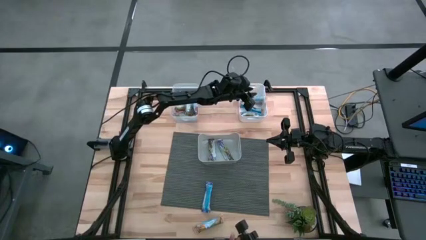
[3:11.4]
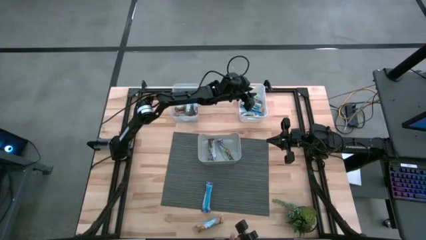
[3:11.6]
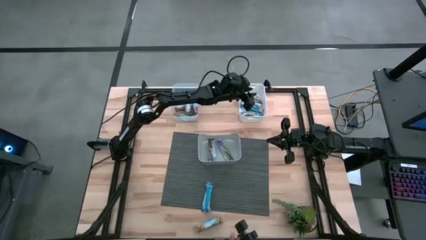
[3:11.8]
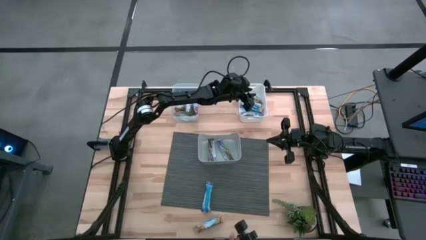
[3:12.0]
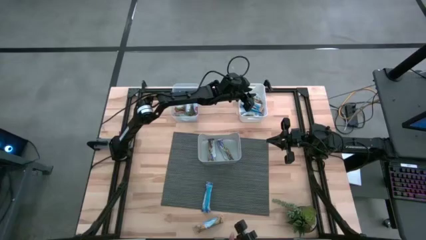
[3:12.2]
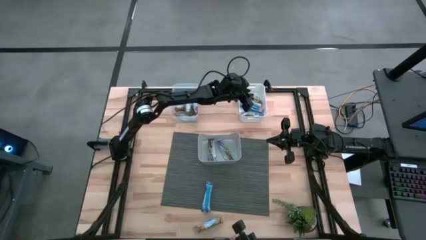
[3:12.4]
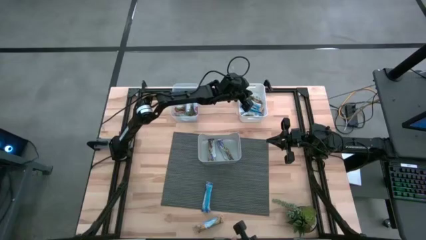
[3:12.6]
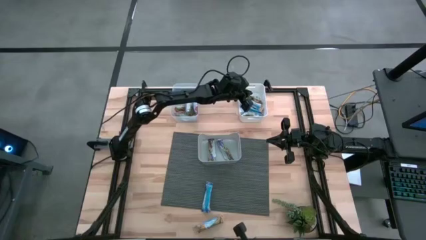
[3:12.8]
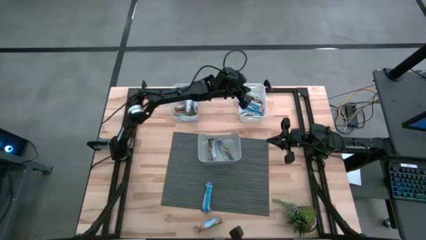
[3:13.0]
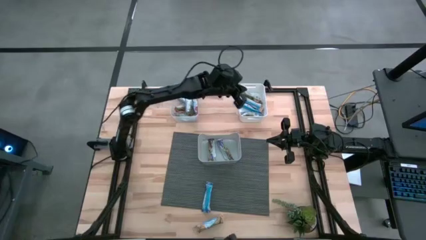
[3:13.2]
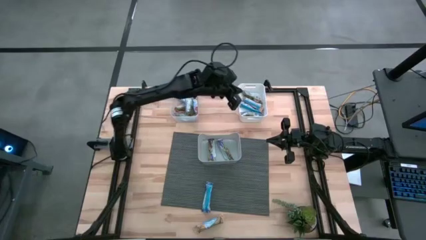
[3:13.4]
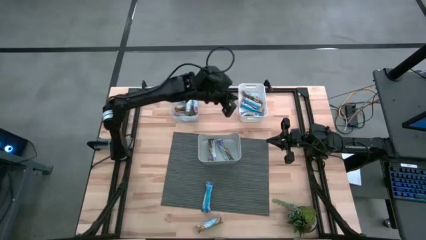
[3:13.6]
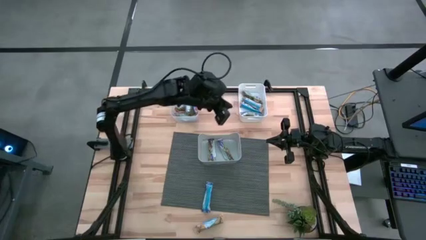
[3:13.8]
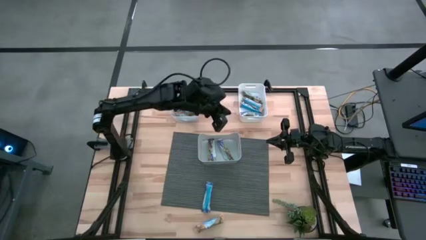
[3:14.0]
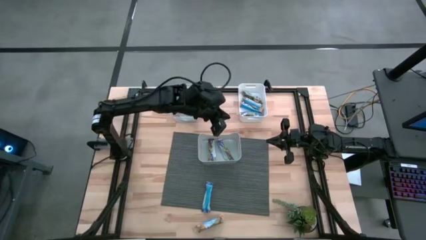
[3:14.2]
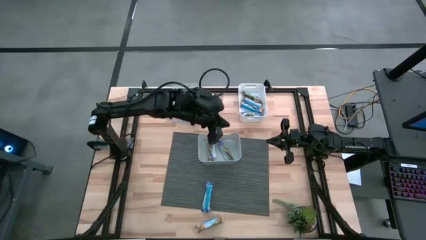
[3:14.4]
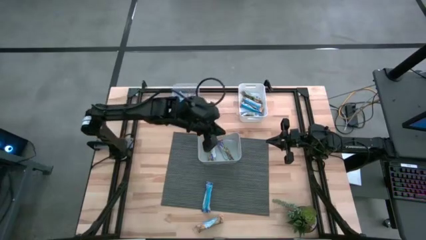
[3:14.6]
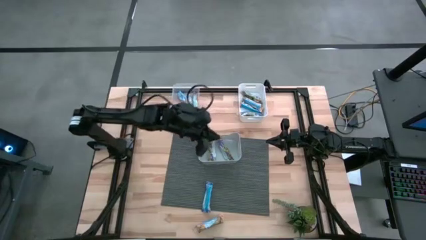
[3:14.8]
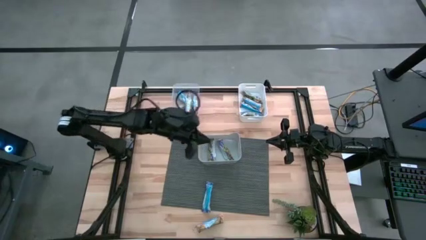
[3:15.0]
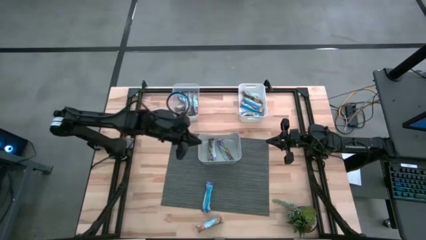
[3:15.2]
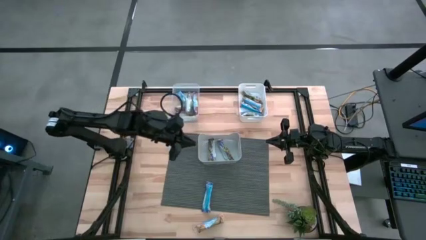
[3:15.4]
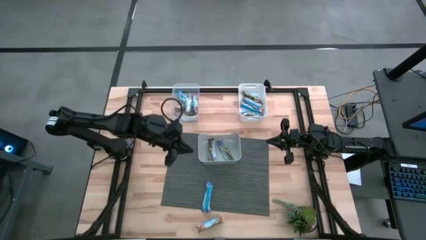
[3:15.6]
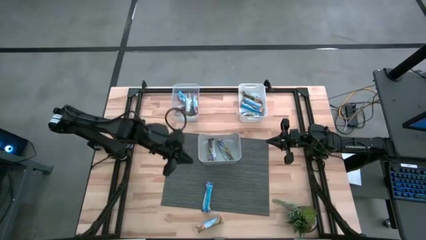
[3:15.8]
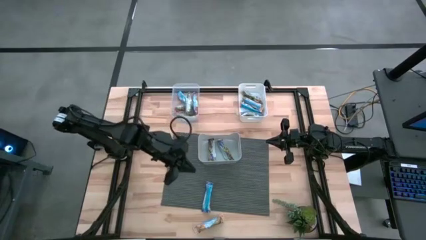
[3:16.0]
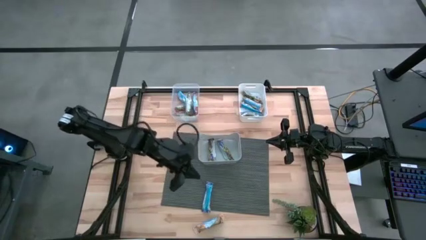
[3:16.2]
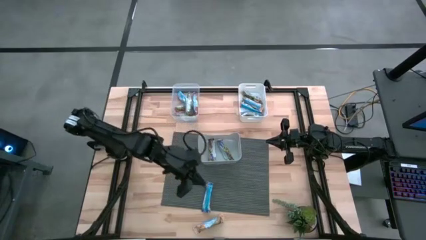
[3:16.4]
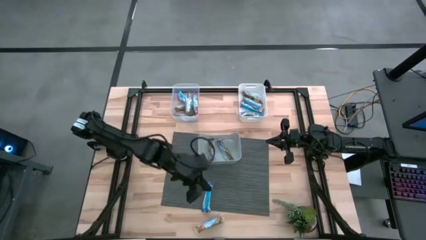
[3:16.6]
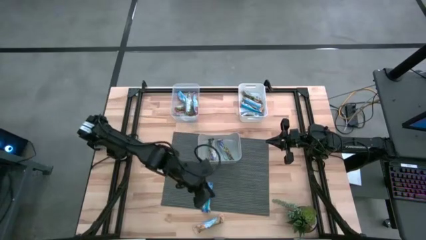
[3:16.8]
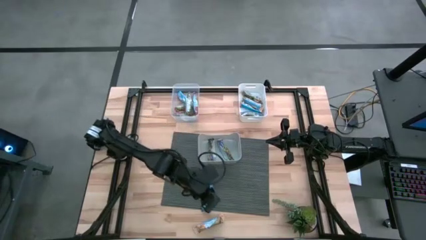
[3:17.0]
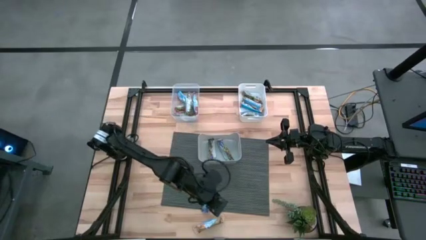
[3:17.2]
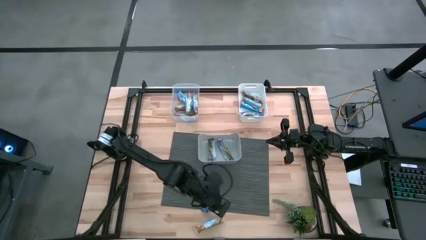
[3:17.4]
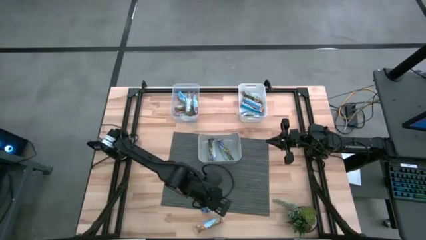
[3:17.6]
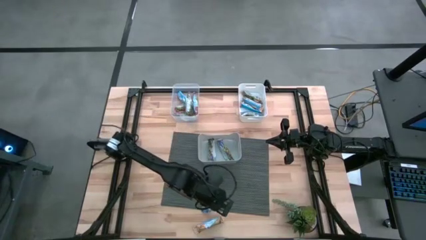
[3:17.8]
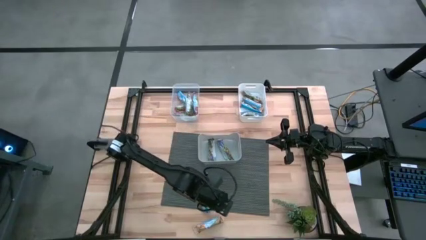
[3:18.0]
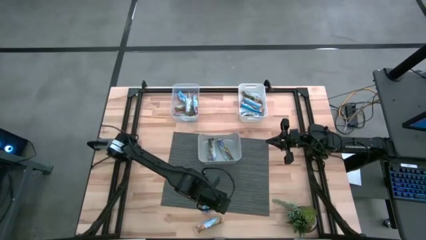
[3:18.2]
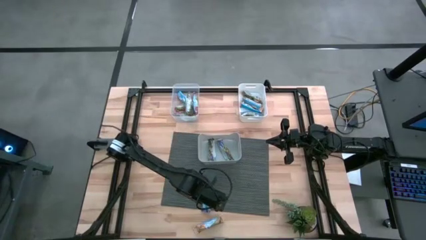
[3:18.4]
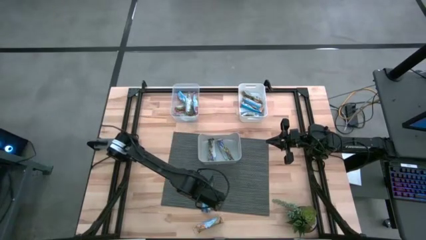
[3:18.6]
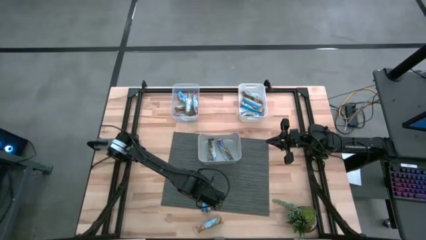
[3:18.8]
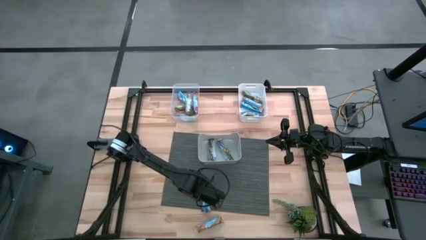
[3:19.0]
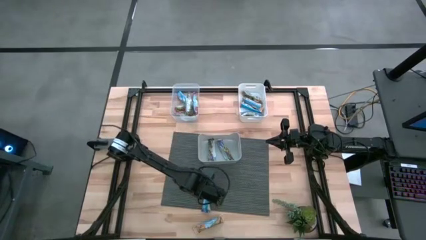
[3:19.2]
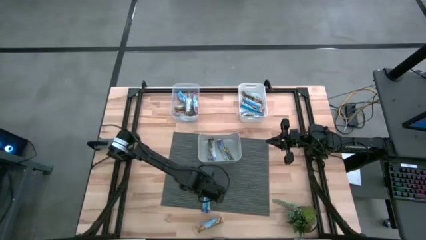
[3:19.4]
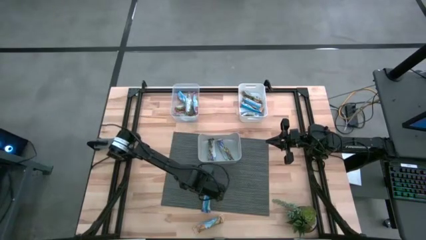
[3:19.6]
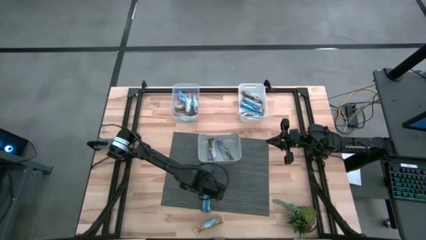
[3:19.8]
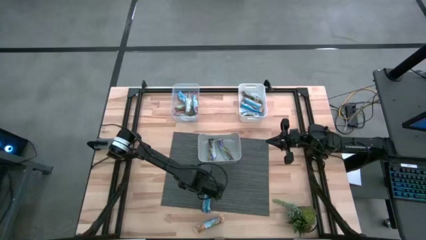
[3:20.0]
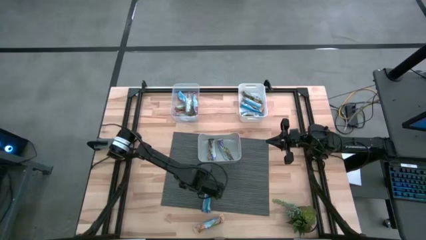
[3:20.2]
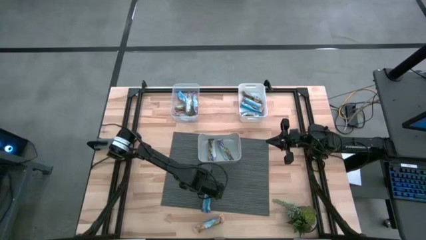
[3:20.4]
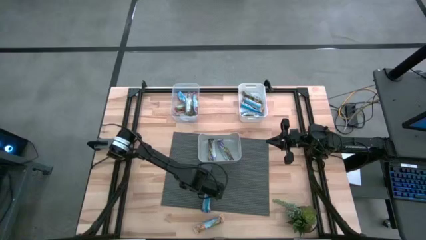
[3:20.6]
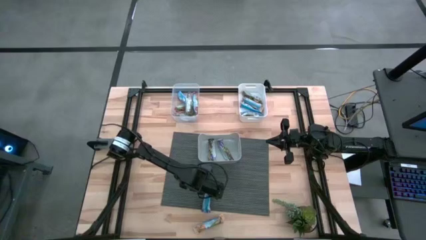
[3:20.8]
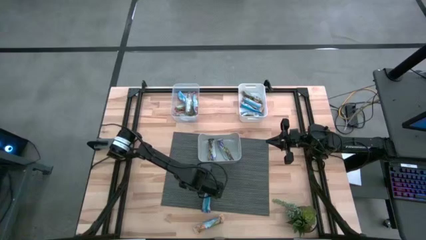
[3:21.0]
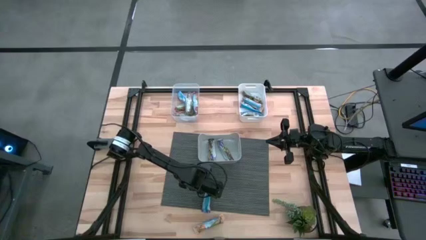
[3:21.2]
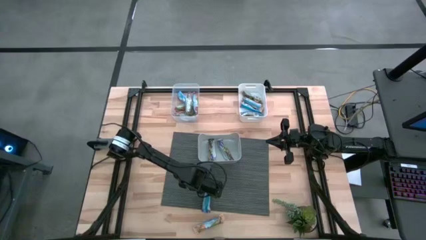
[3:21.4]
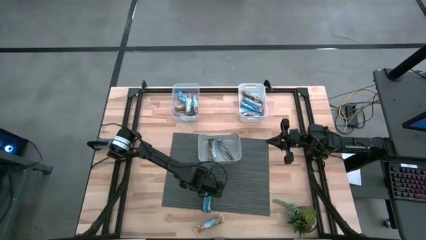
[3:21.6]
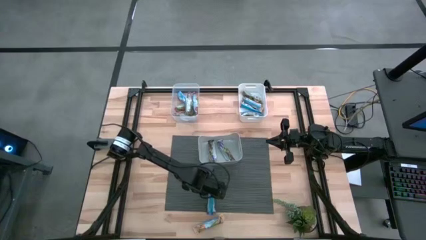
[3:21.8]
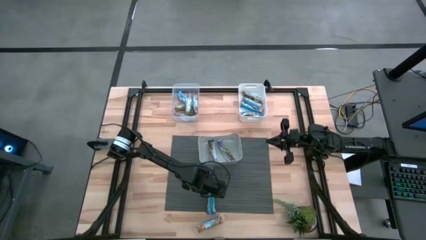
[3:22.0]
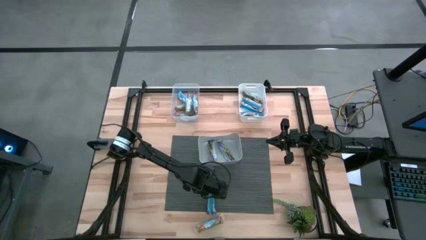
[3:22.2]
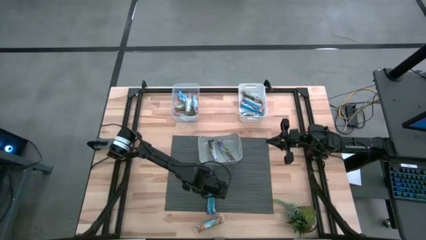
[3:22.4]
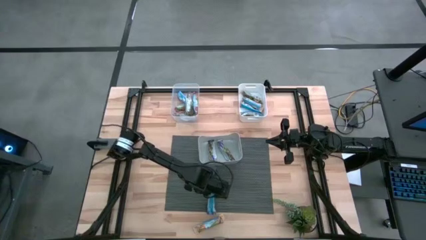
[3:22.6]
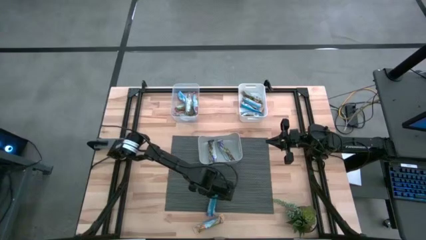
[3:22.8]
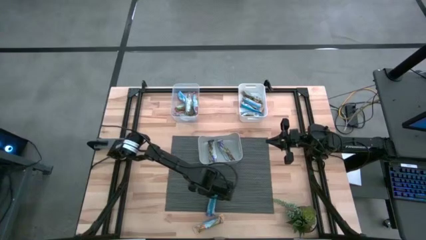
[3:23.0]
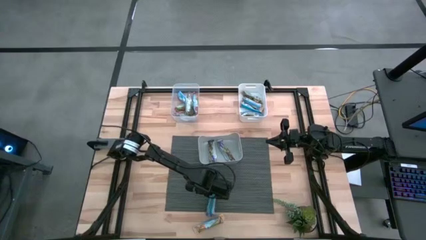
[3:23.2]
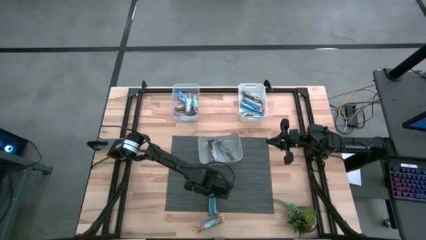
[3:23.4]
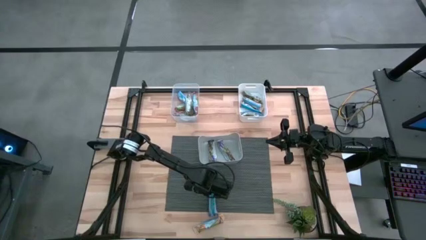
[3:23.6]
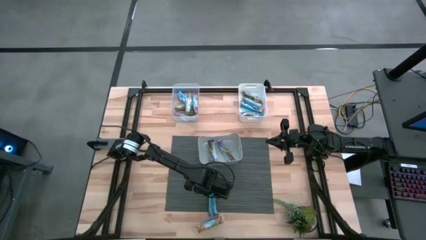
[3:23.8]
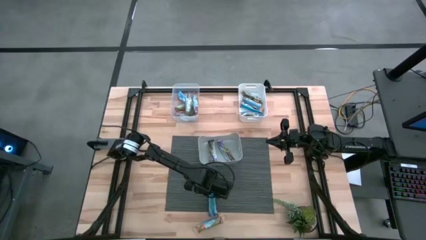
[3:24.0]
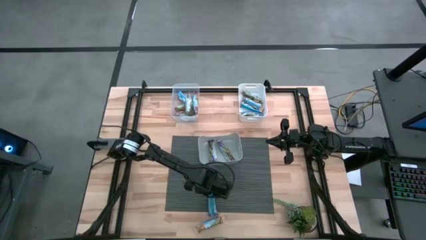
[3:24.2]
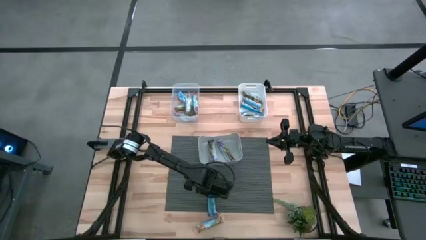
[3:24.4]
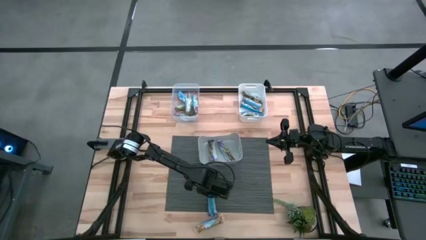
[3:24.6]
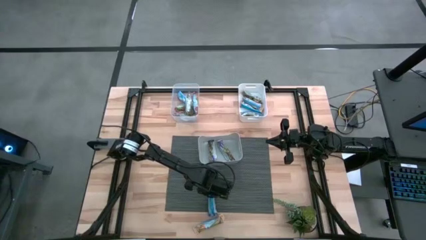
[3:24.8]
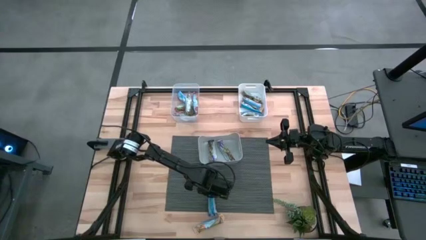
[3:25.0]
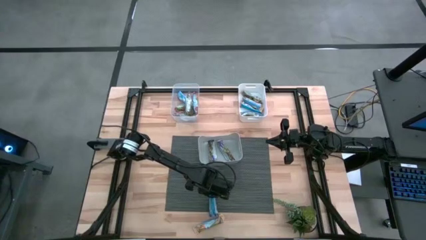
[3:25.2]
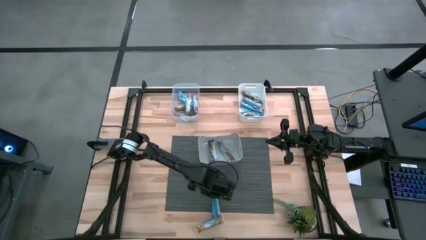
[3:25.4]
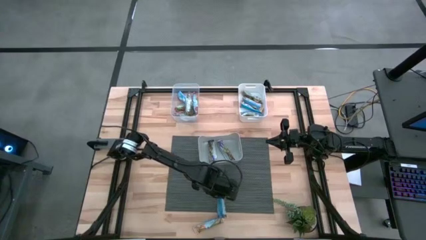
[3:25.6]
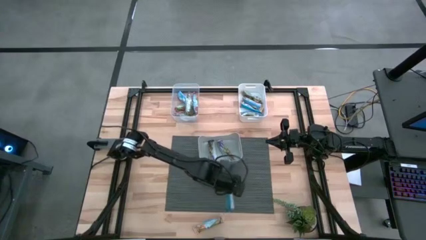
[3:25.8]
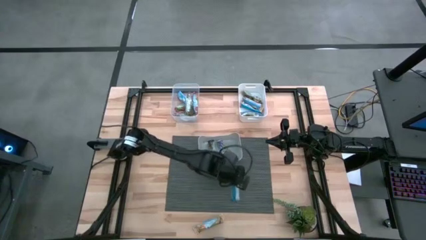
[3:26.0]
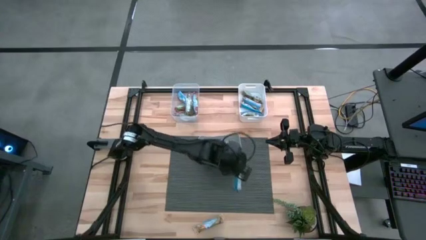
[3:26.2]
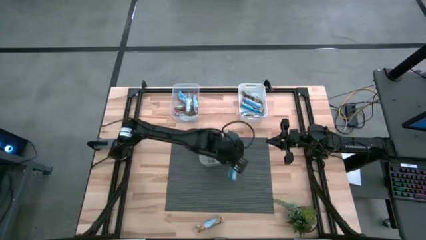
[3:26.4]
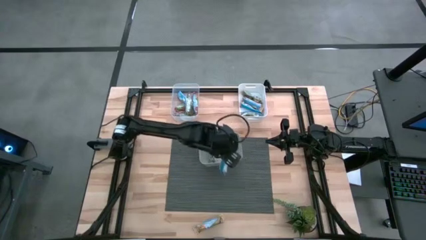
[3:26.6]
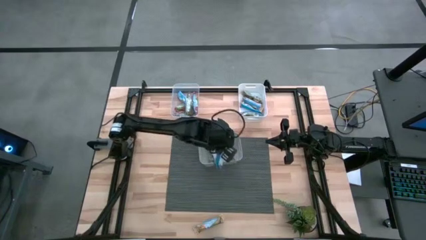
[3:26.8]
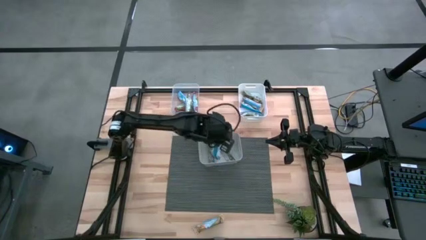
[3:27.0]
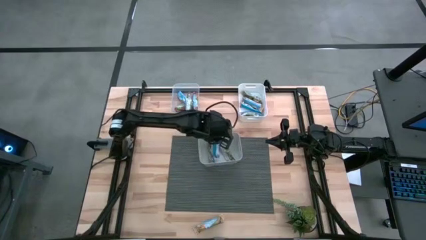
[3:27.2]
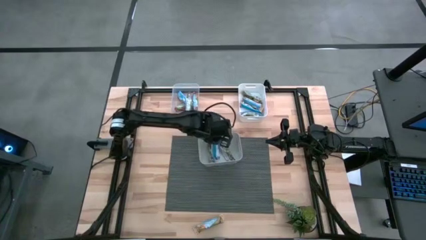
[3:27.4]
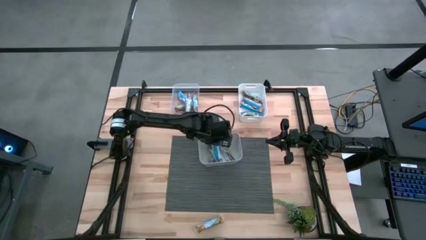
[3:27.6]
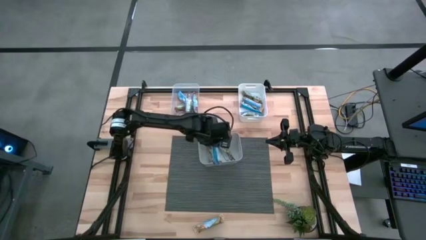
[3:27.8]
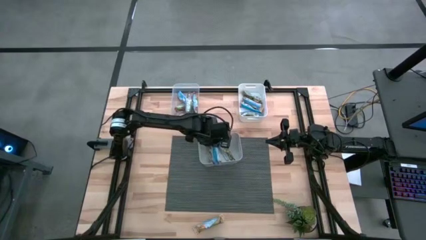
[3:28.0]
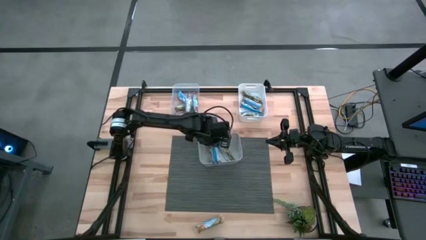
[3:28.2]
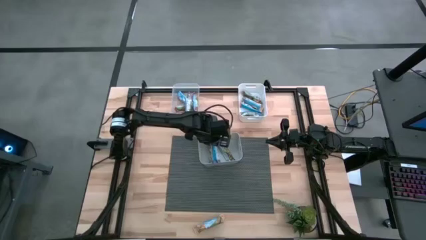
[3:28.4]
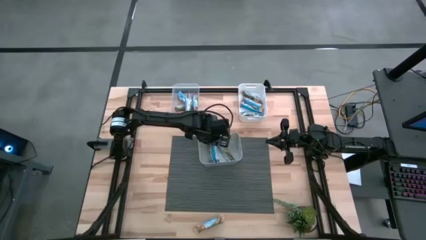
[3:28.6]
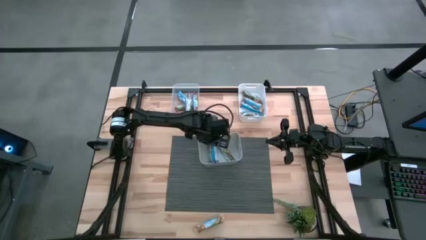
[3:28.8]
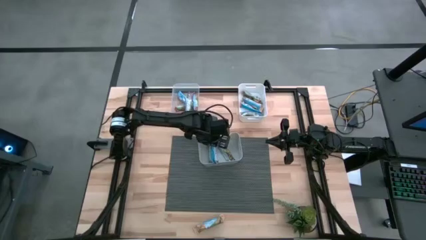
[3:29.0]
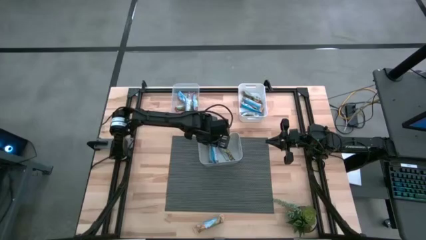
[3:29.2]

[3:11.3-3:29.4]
Task: Pick and place Granola Bars by type
Put the blue granola bar into the gray bin
